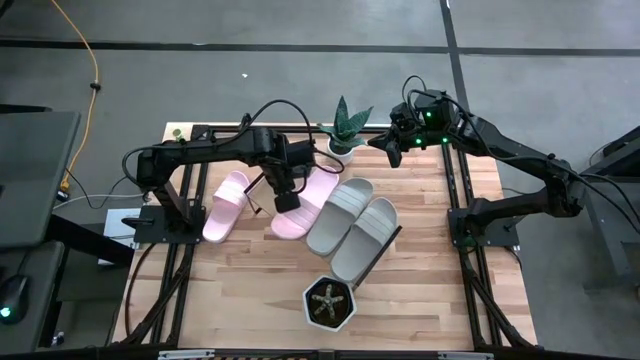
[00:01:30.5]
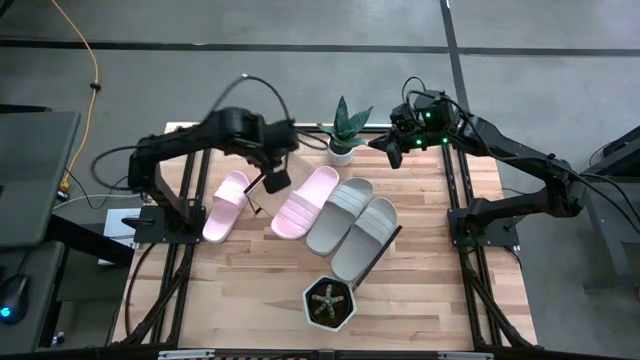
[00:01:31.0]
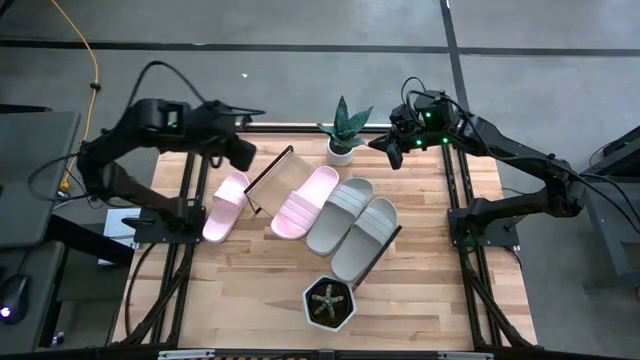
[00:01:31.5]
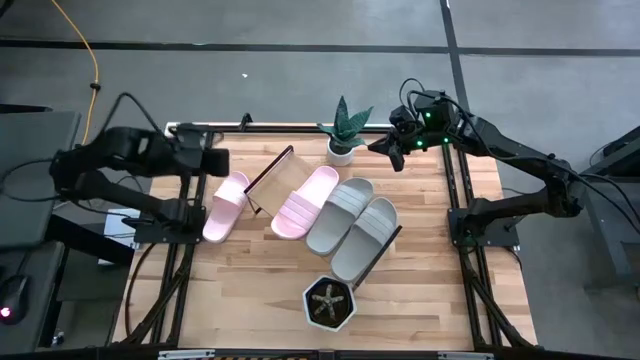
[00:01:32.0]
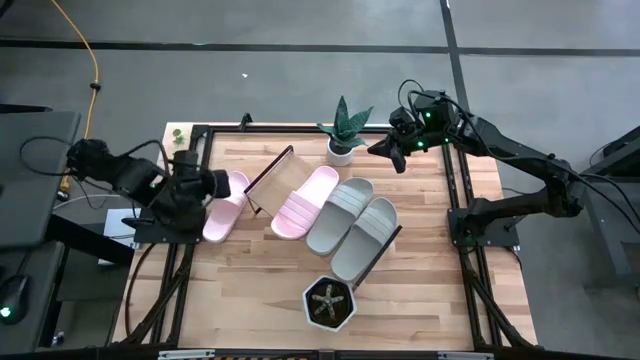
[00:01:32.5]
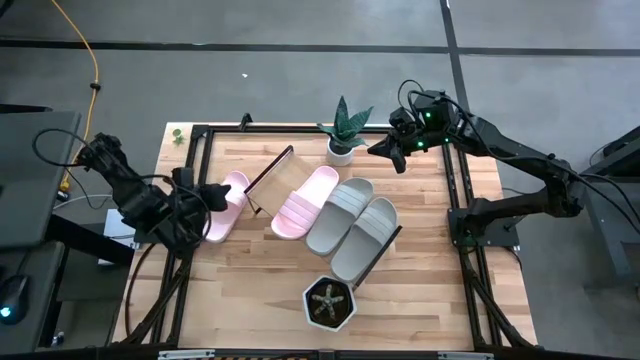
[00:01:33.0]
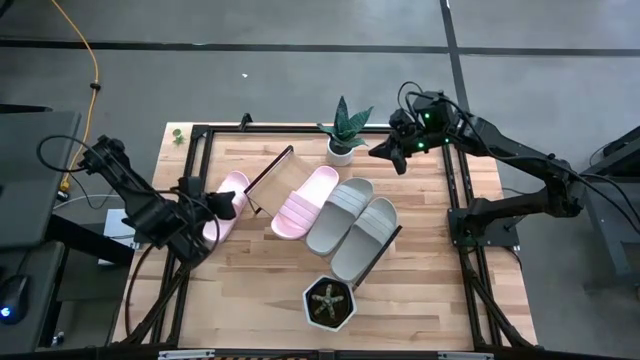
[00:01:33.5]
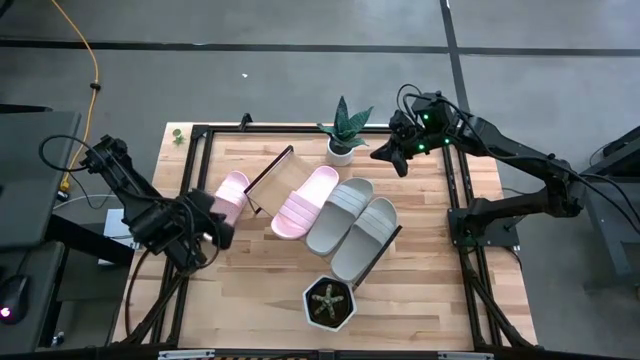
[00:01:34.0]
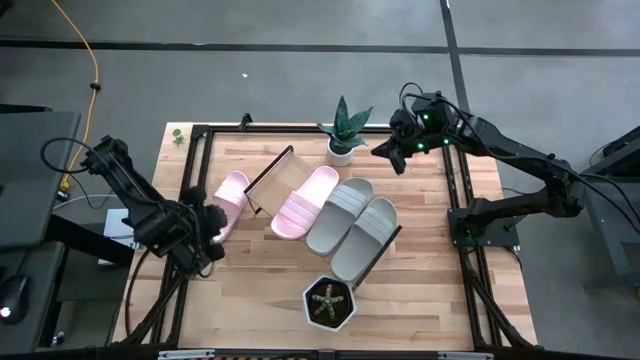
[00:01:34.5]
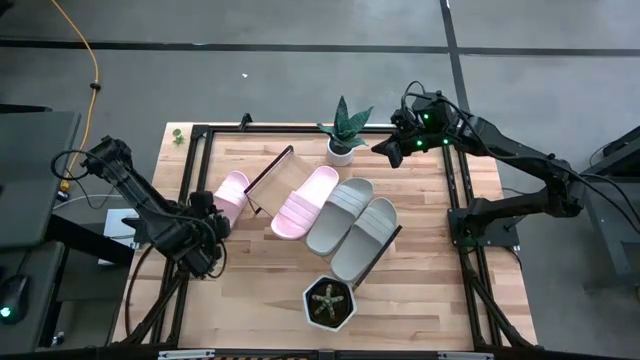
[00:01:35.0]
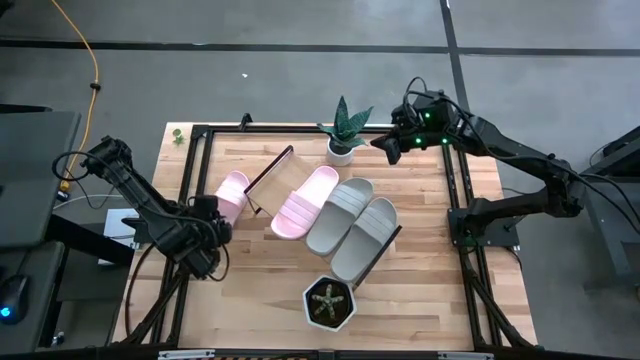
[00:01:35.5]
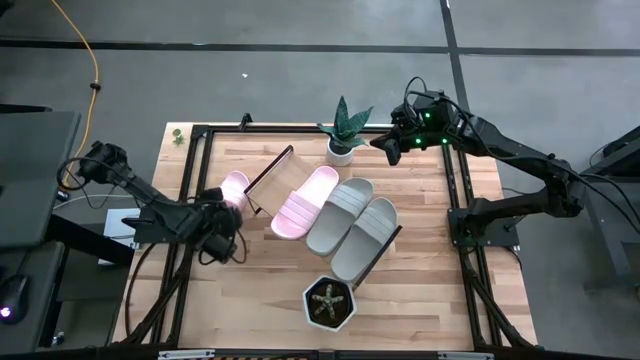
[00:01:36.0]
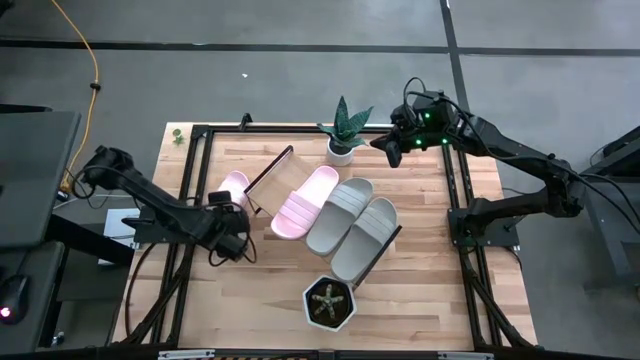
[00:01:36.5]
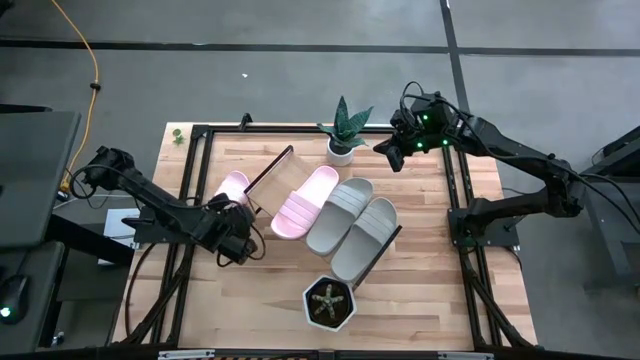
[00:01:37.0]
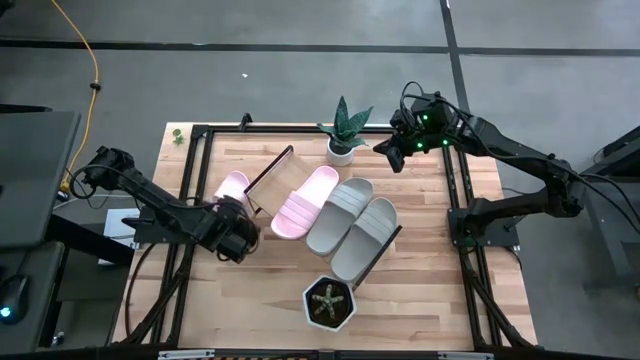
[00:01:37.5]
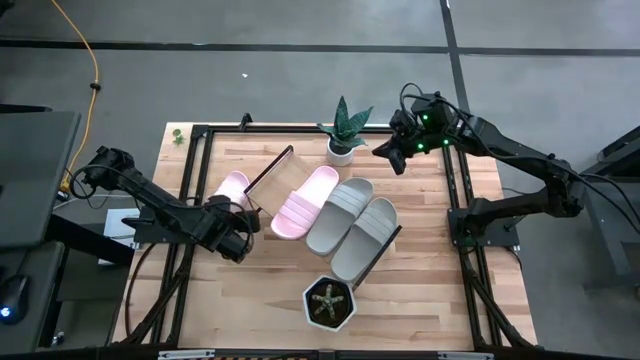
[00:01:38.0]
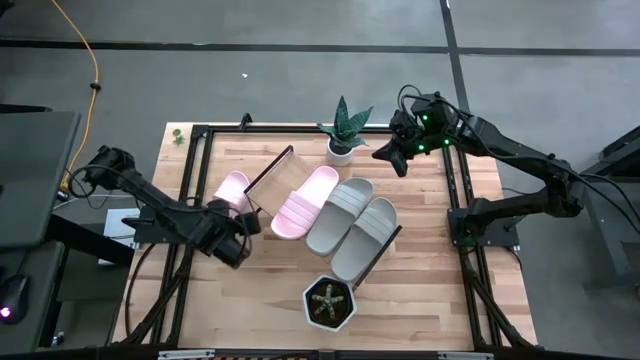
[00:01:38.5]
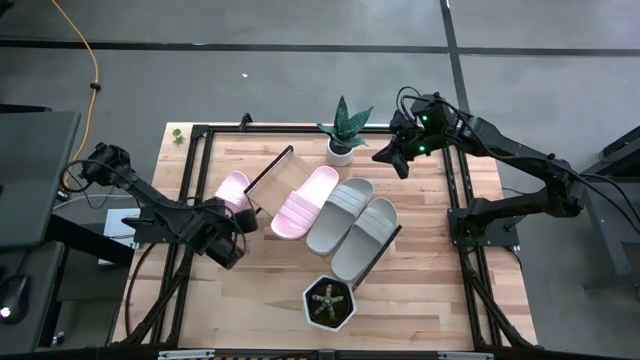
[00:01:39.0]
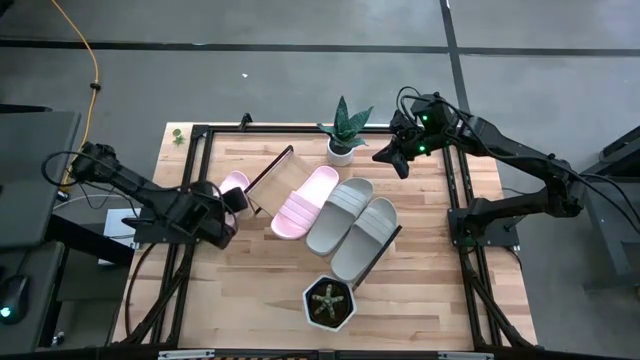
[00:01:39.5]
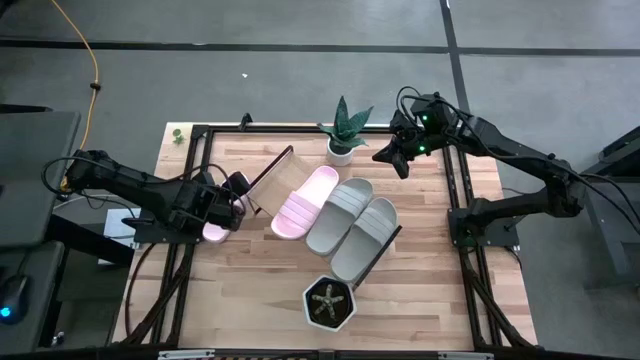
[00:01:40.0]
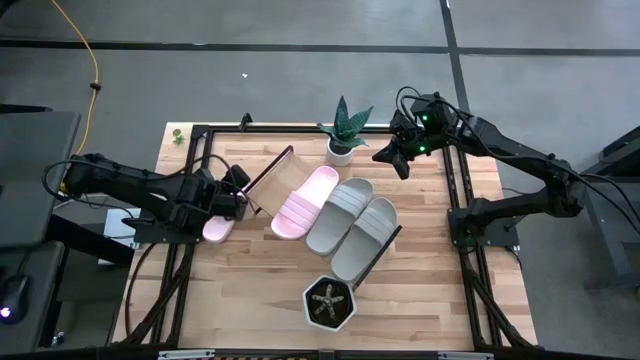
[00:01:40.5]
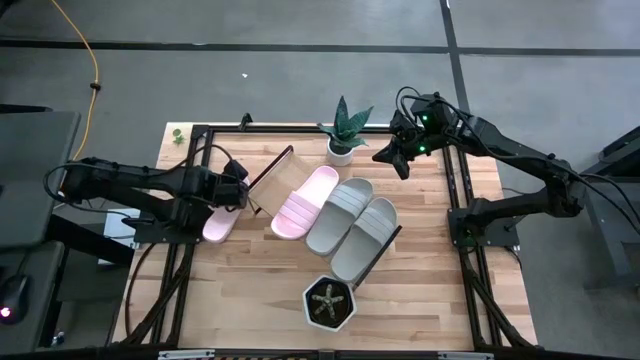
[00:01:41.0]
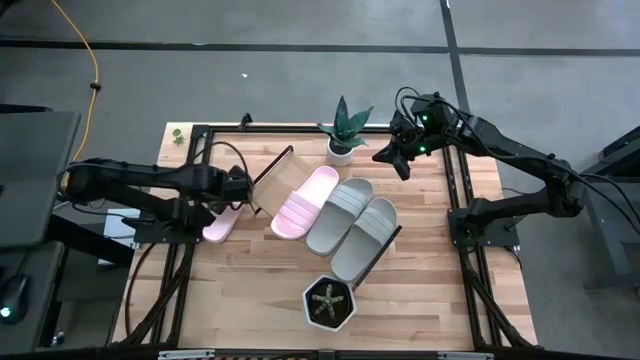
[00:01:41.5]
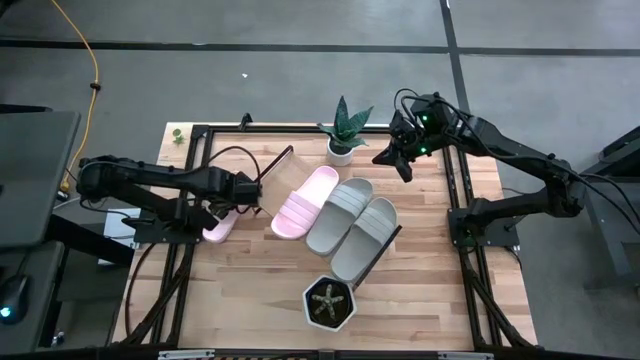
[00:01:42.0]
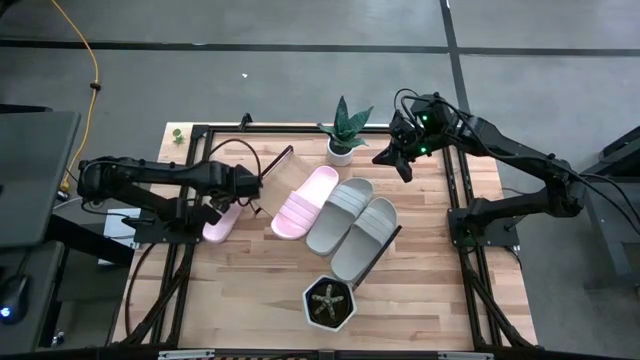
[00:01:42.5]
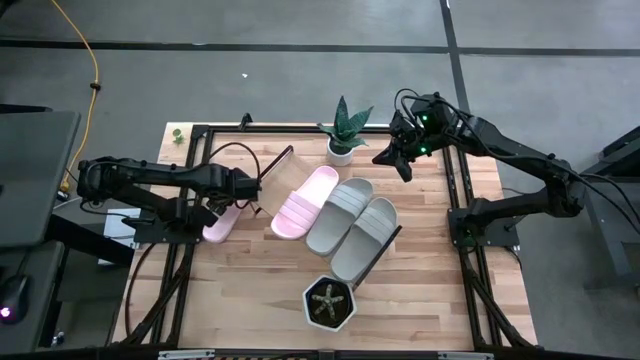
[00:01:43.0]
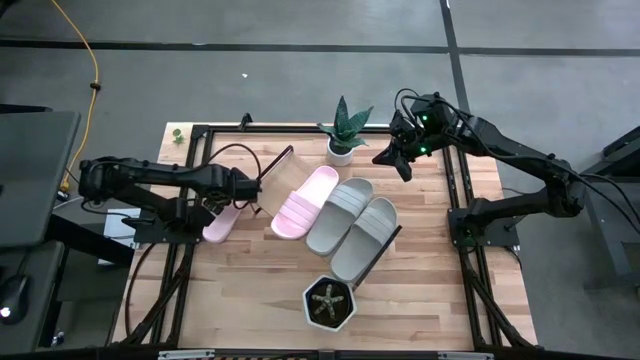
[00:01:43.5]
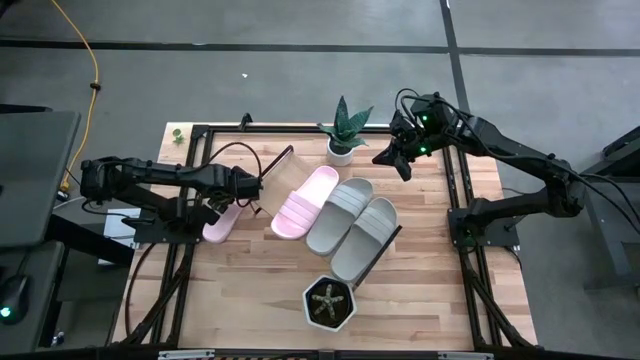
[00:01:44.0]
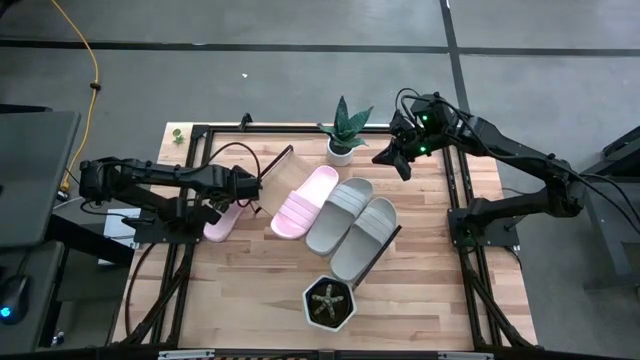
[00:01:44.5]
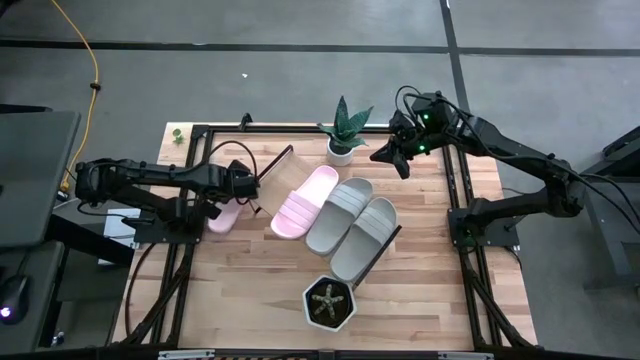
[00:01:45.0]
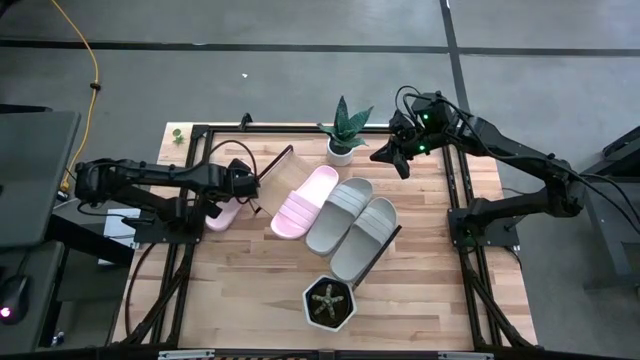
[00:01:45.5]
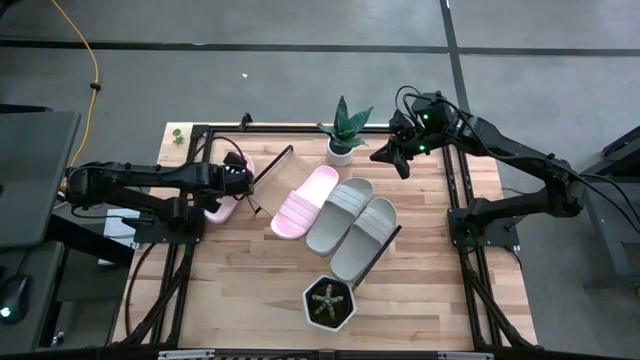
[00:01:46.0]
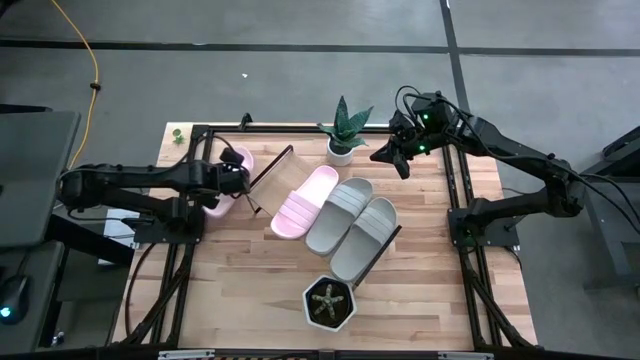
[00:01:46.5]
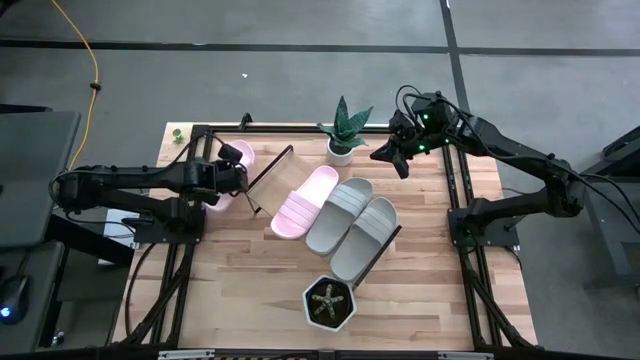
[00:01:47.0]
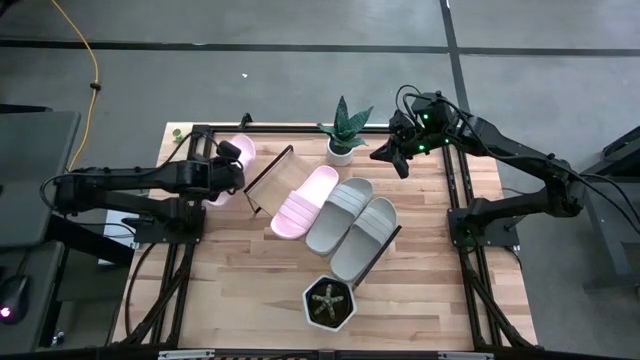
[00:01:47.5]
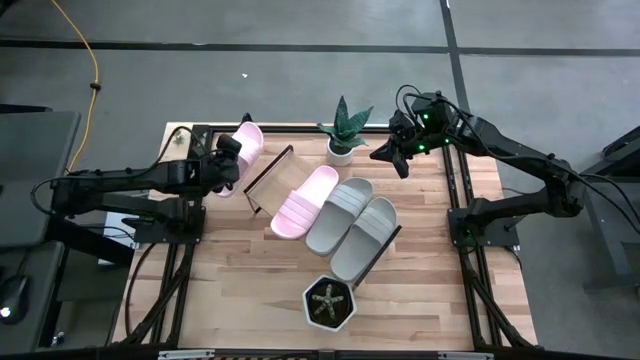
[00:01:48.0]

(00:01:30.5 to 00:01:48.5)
Task: Pick and place slides into the shelf
Put the pink slipper on the shelf
